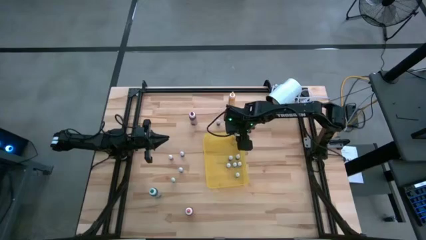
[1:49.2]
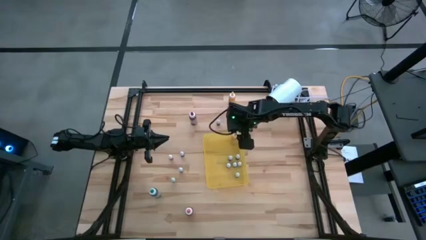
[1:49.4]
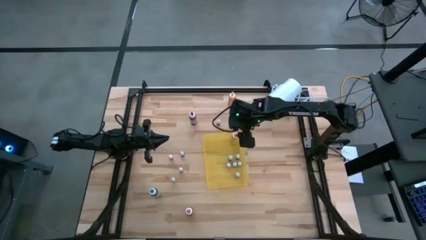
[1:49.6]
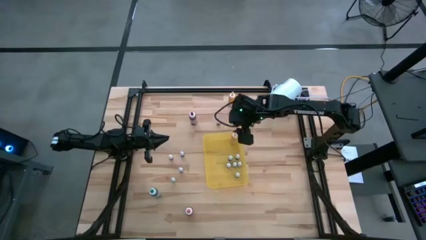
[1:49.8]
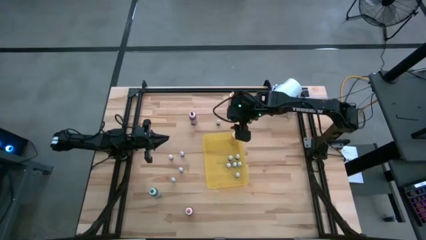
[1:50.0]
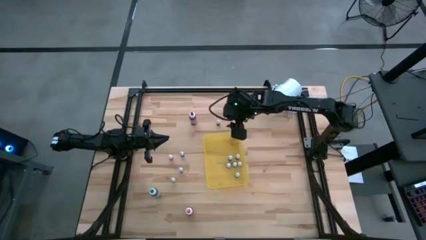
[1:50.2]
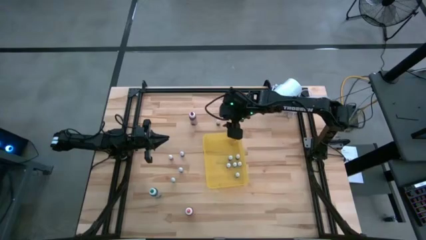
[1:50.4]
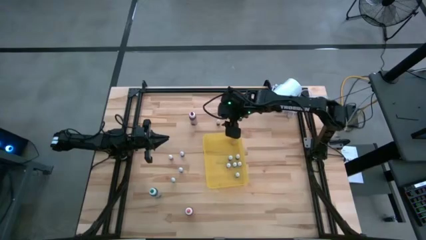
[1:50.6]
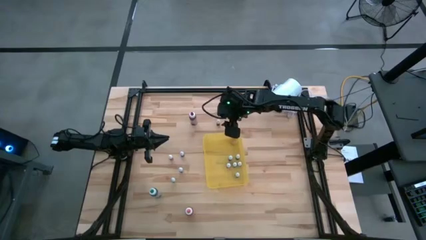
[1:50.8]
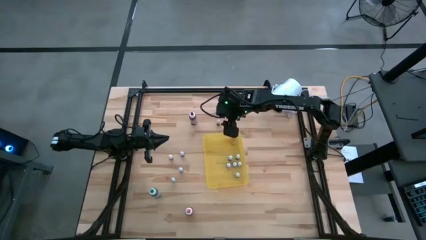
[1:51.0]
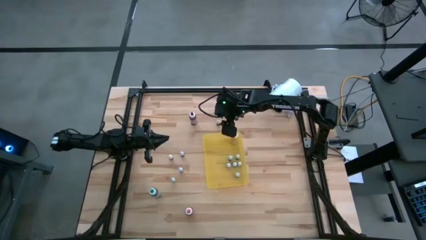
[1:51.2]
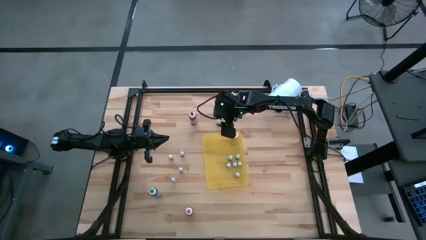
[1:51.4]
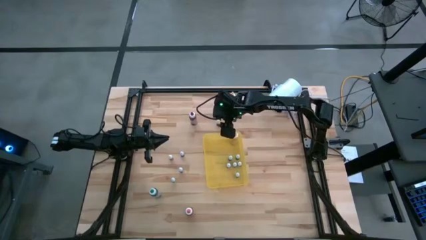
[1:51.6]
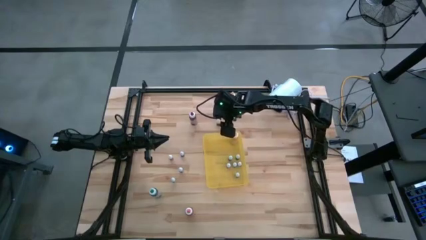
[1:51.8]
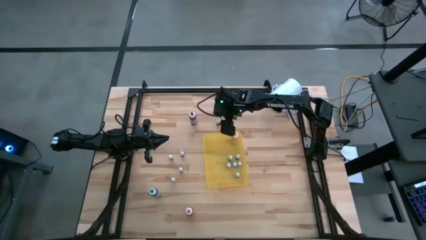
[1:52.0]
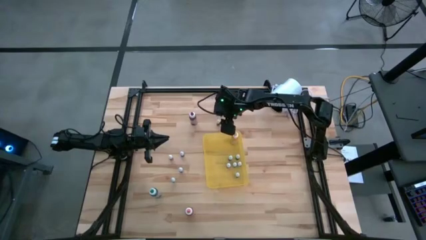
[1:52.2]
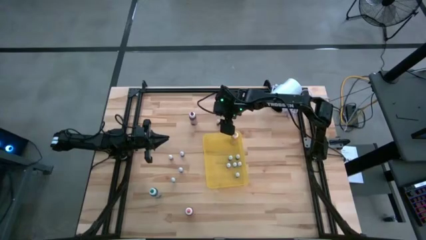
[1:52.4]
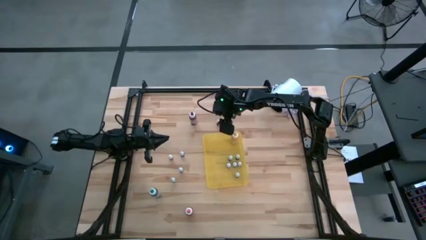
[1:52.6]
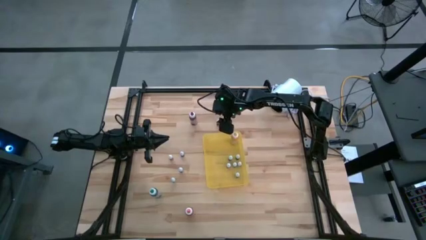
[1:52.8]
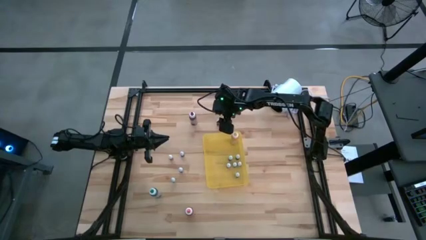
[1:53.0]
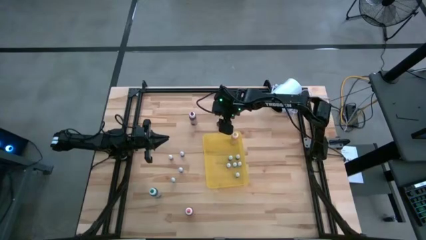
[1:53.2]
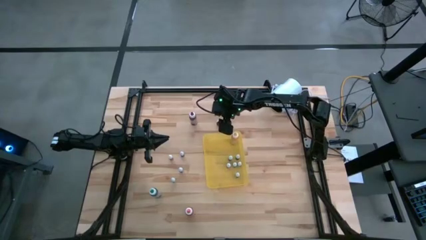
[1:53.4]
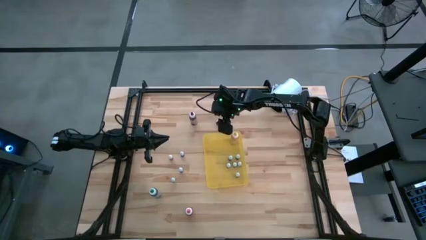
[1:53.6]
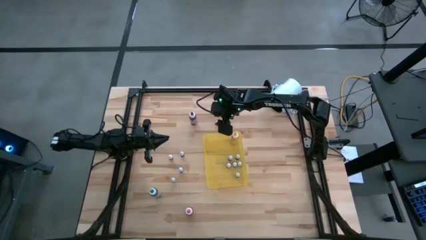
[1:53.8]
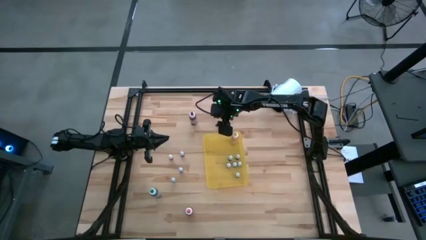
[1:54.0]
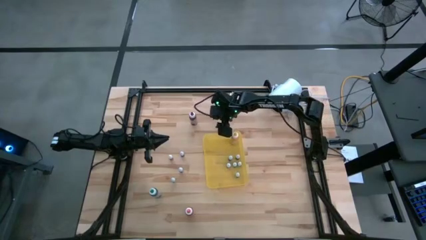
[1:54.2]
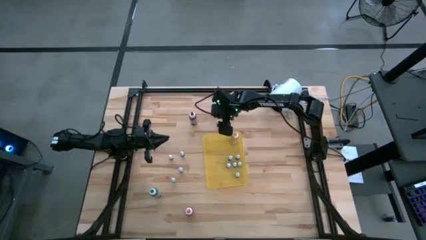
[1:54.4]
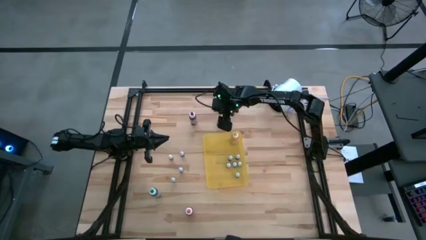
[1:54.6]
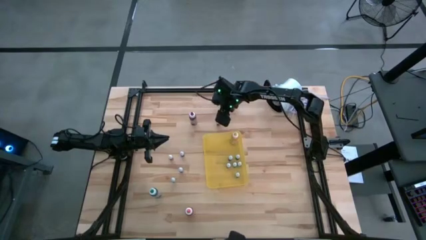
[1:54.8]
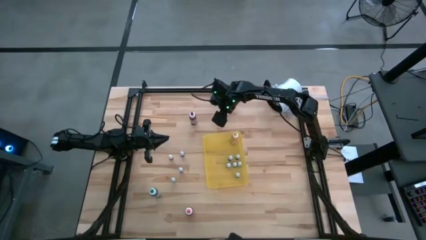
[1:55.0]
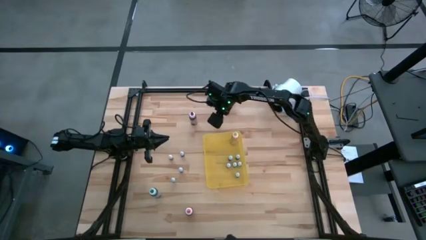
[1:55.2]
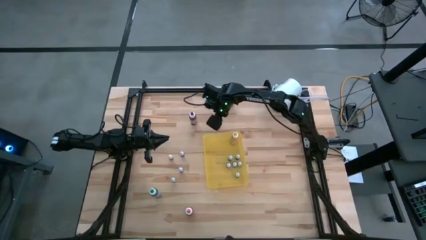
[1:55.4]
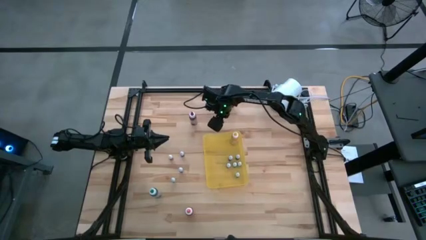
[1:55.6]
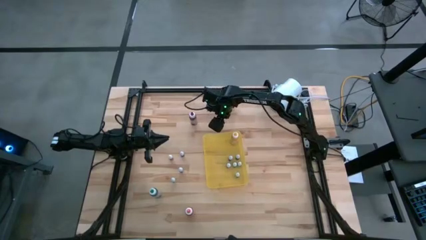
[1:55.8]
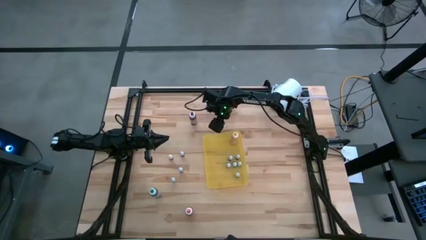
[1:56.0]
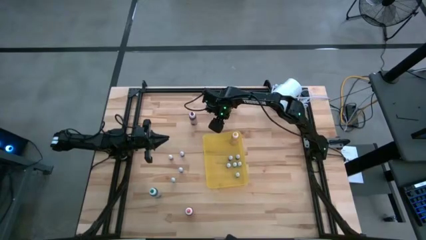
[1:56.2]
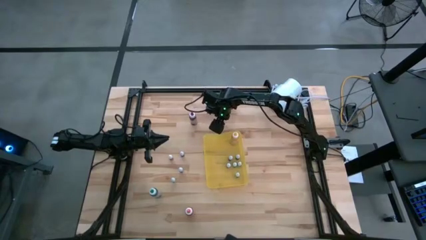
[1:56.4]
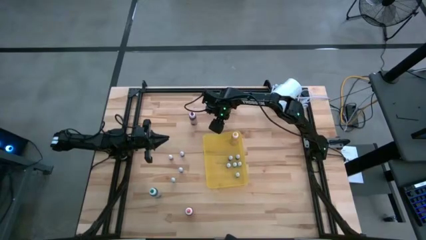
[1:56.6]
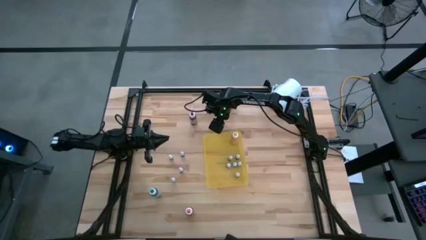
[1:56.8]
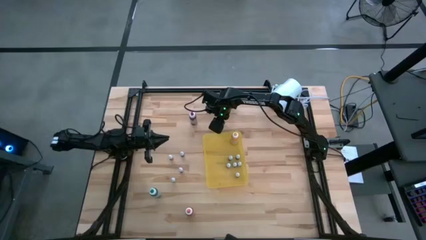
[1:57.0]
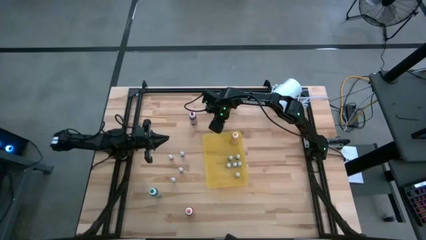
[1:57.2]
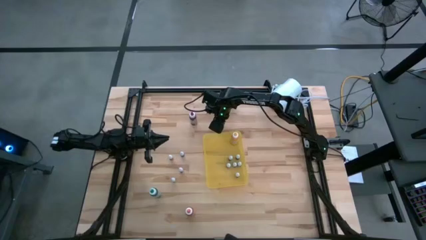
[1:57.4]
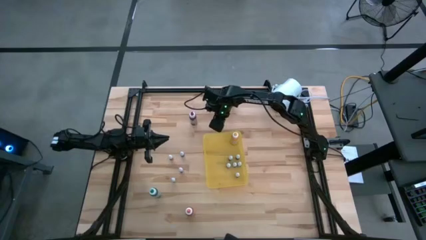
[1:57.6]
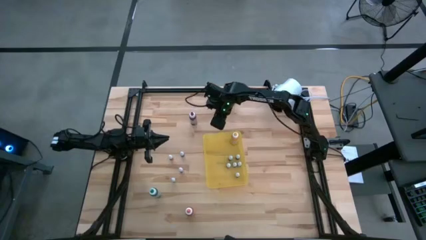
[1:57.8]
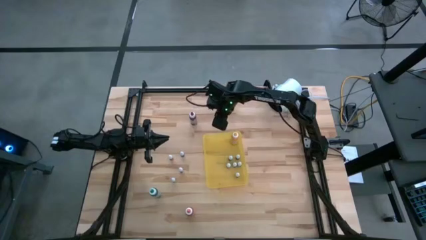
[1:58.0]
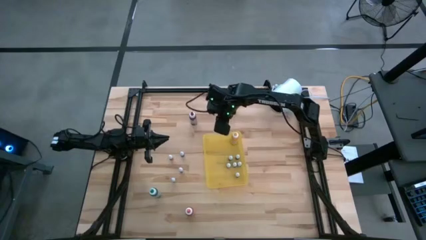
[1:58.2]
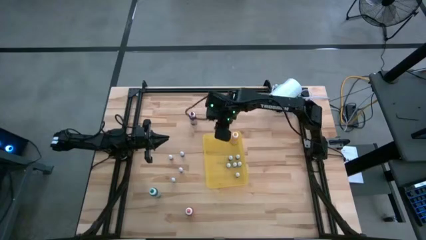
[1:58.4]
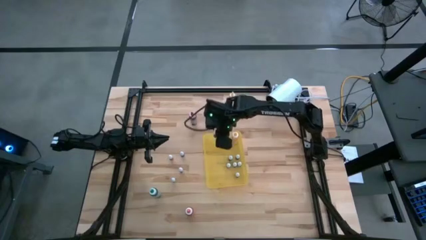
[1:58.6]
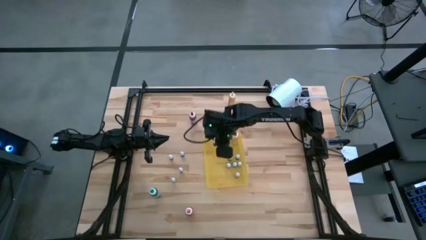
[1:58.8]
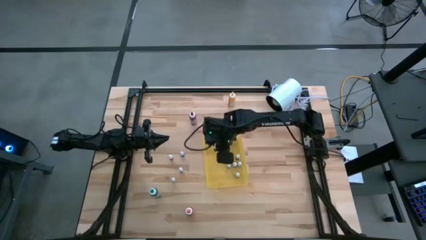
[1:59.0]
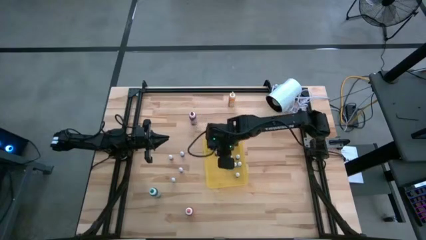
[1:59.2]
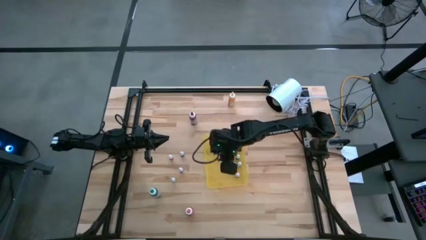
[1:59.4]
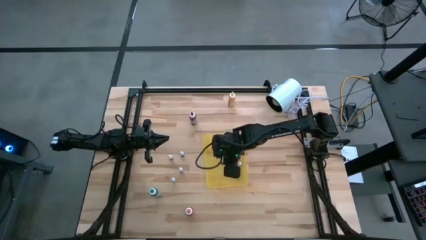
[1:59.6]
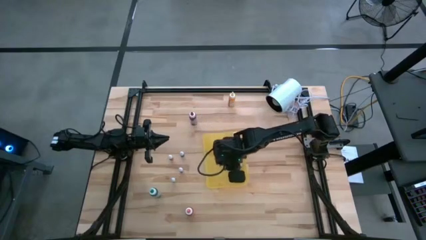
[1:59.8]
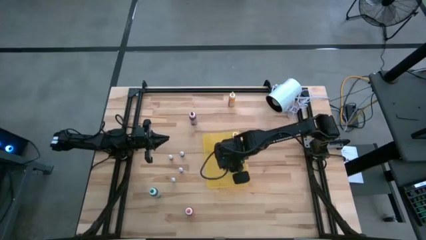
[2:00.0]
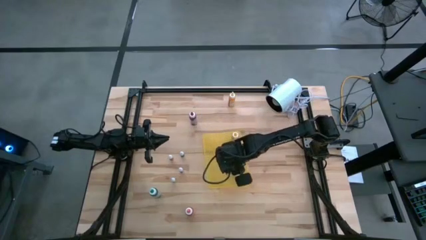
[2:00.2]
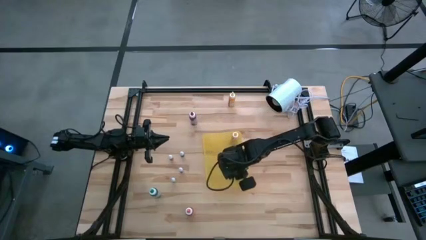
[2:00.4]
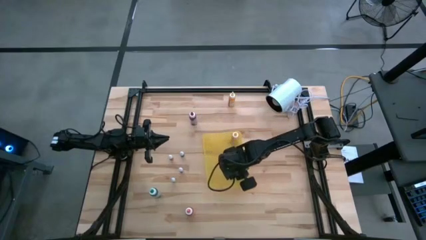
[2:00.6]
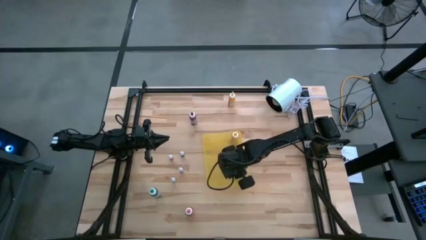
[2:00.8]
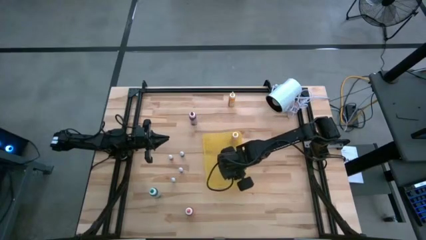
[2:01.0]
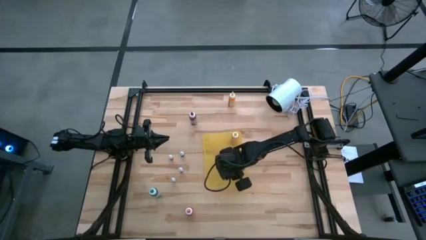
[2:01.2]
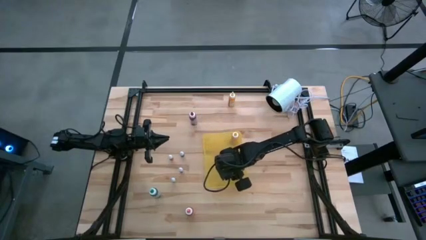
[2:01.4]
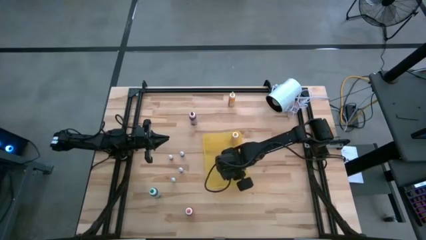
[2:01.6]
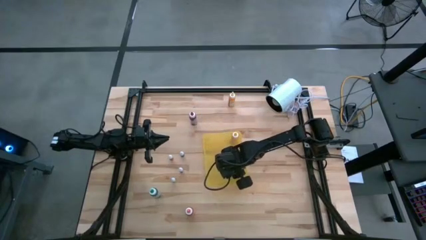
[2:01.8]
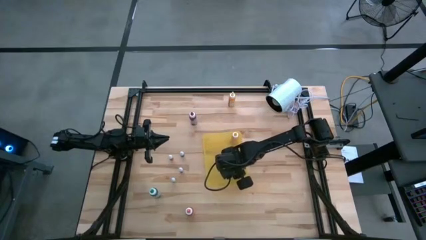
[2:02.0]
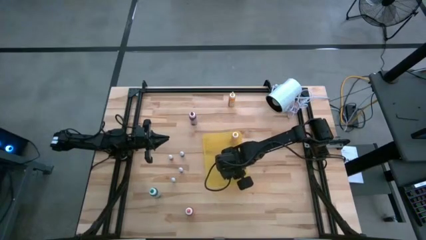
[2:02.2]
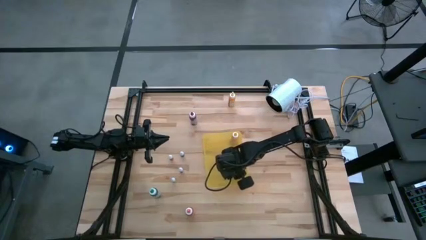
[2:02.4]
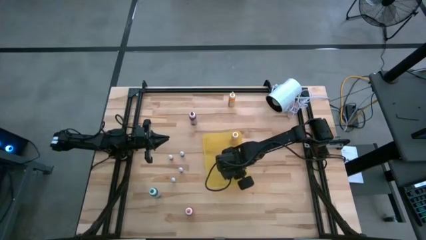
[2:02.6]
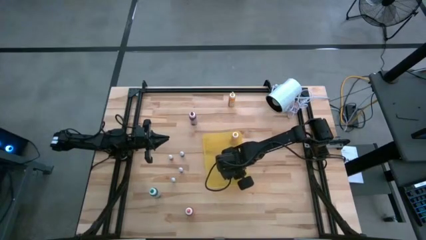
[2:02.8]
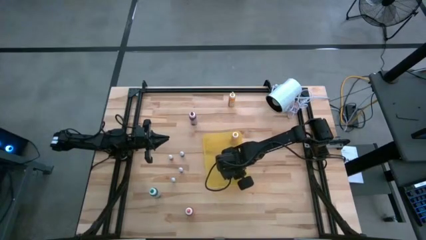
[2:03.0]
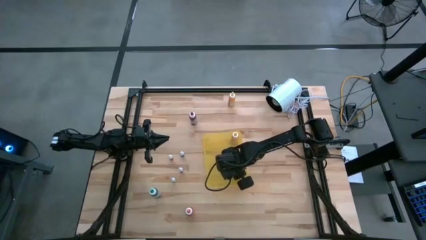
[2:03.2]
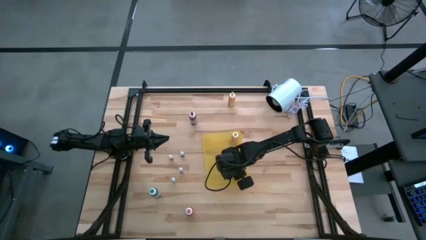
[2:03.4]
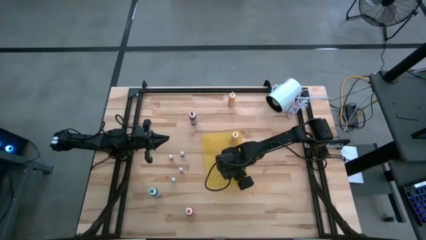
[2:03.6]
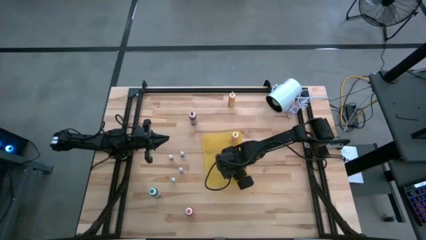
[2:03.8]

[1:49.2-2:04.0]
Task: Pick & Place food coloring
Put the small red food coloring bottle into the yellow bin
